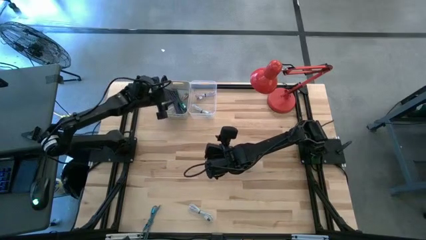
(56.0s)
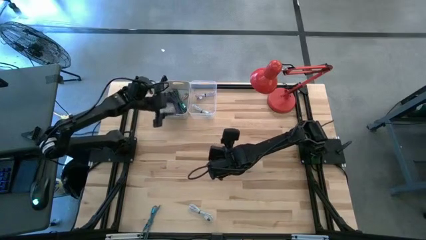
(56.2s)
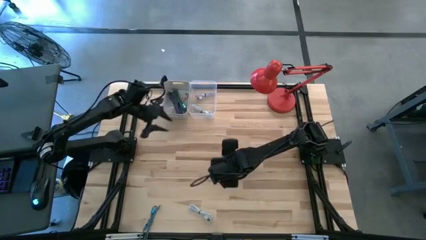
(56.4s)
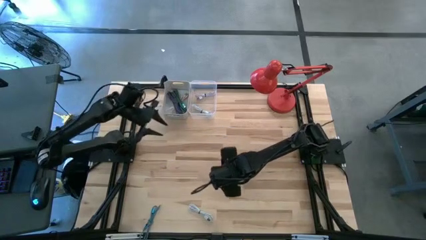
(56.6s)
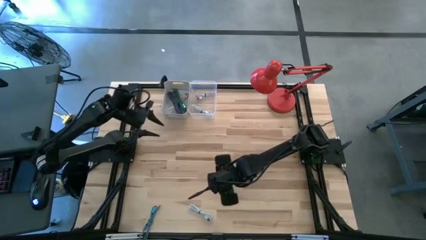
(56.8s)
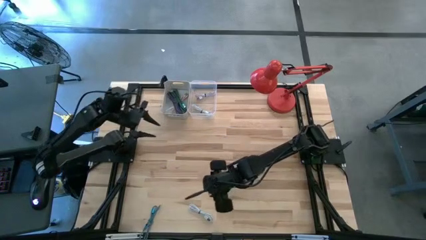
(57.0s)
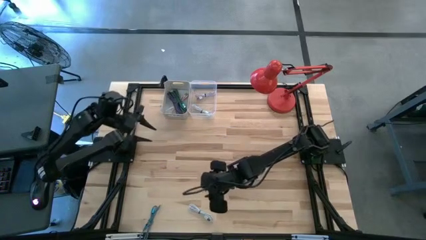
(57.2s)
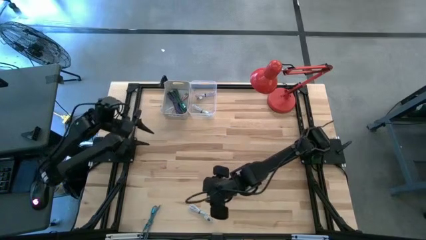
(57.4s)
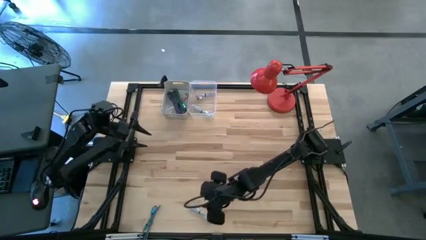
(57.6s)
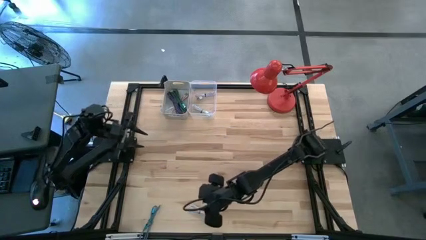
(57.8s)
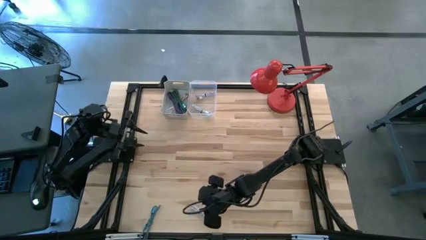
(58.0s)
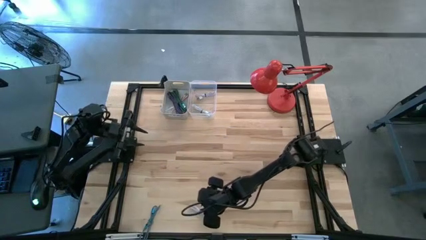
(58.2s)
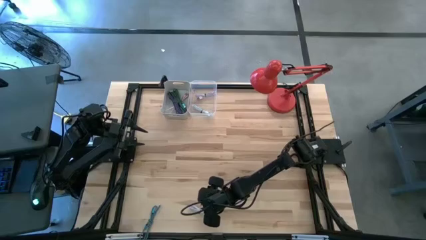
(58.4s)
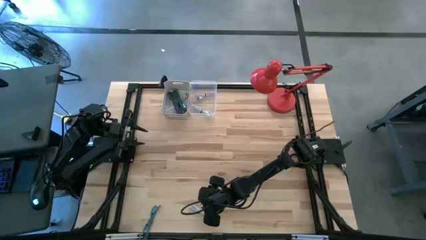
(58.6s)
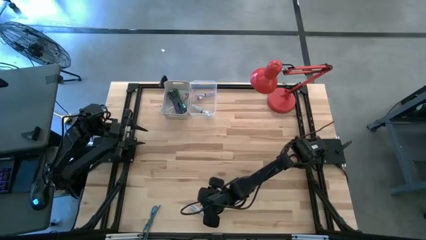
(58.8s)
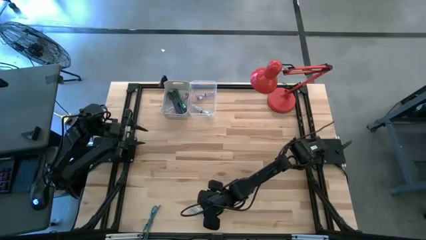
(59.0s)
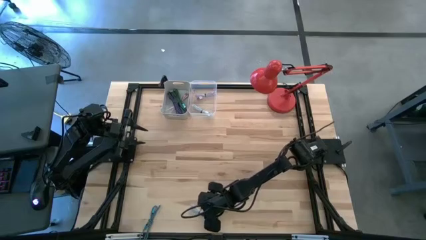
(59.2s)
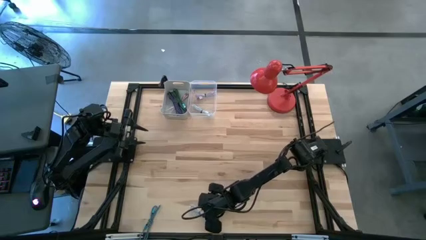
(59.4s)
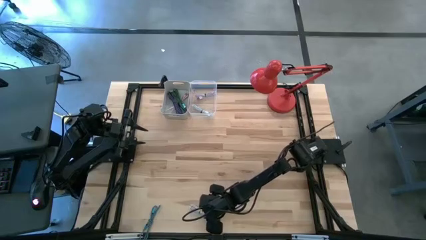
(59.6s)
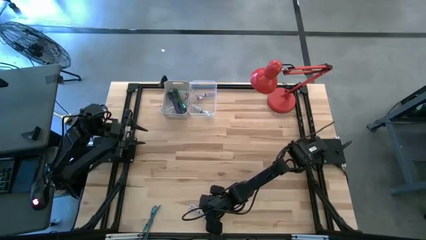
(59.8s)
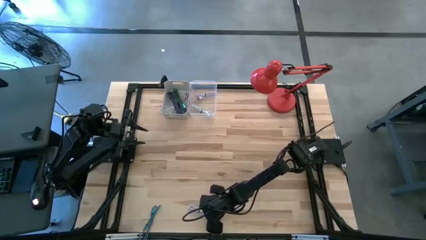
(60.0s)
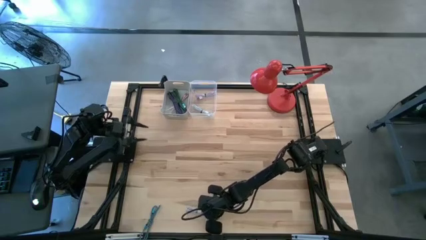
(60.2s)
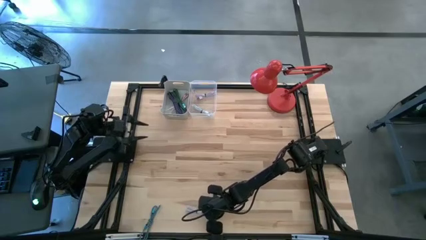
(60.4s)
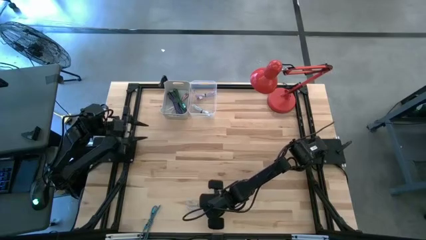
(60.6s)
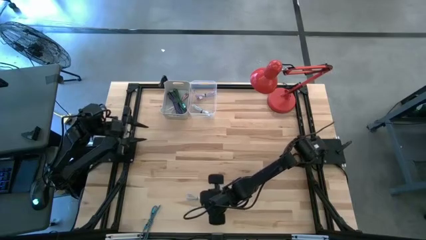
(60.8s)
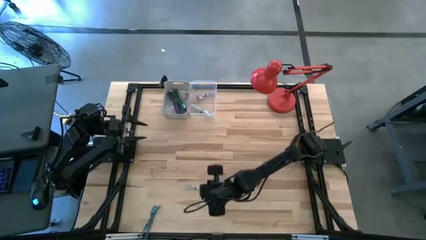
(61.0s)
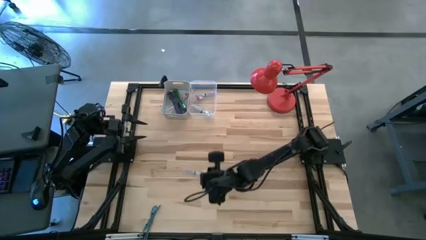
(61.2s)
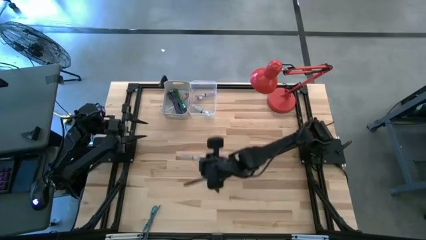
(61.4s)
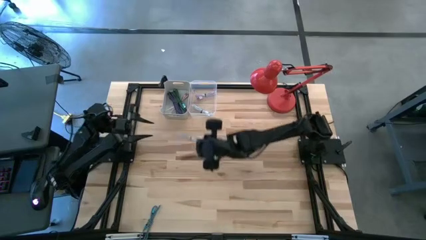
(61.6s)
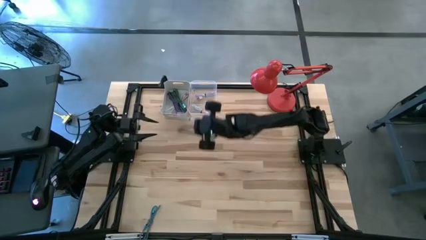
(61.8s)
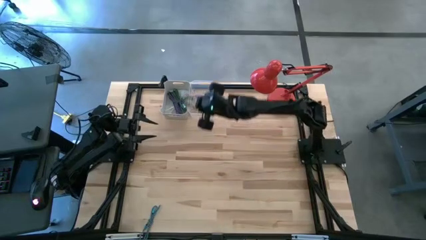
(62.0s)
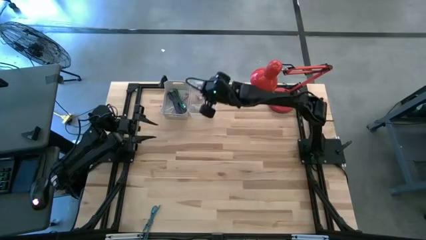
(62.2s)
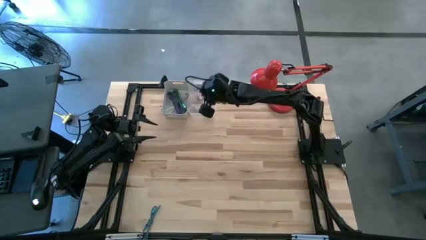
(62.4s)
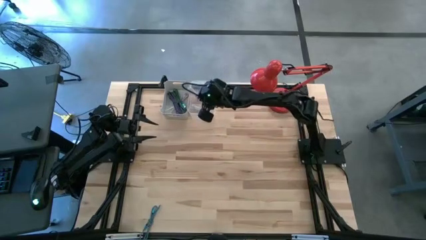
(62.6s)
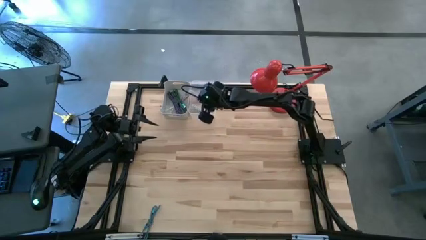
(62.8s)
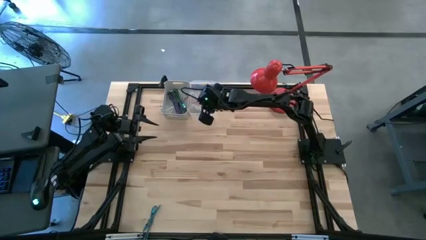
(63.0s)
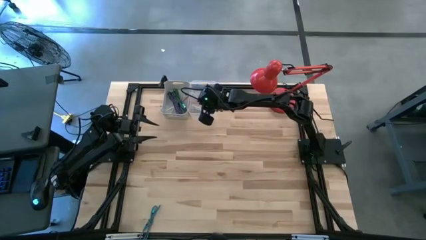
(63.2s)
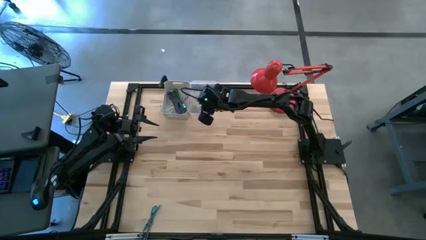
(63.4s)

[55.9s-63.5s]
Task: Pick & Place USB Port
Put the white charger cable into the transparent bin

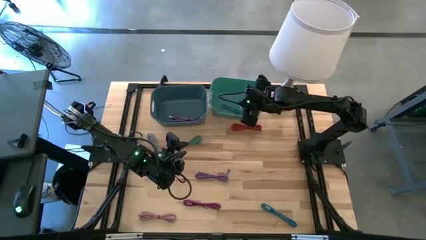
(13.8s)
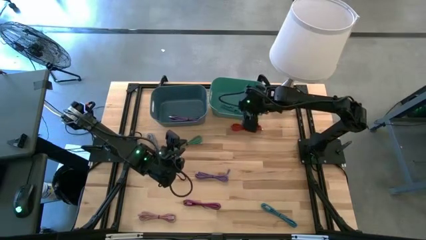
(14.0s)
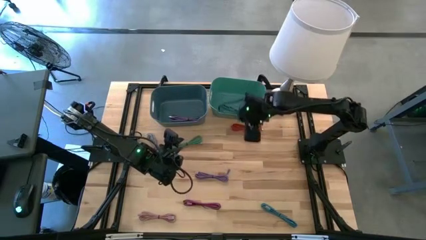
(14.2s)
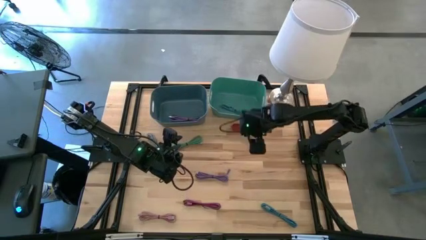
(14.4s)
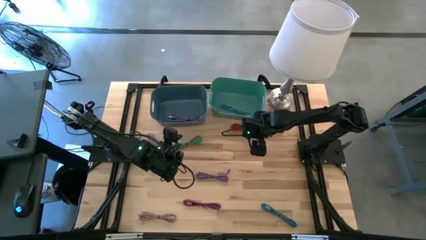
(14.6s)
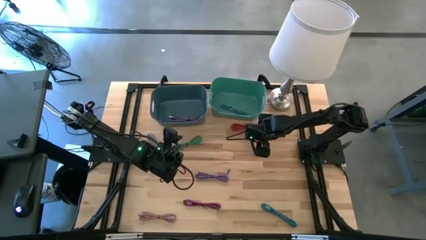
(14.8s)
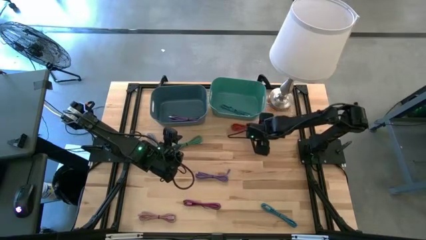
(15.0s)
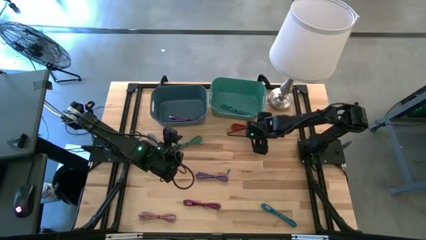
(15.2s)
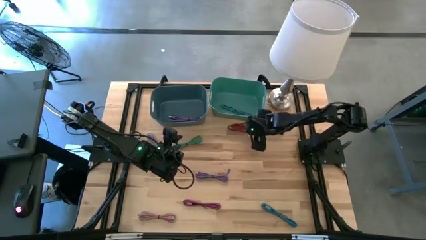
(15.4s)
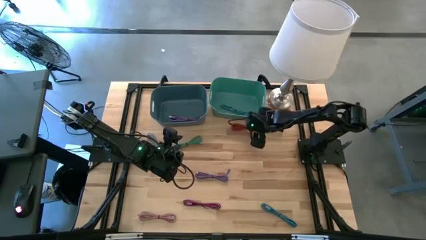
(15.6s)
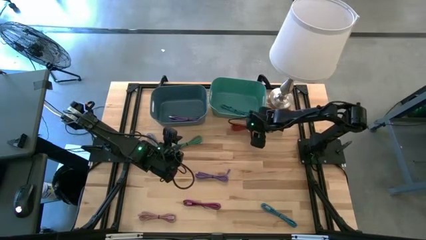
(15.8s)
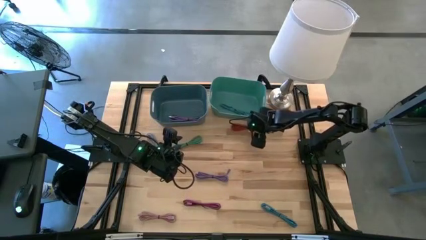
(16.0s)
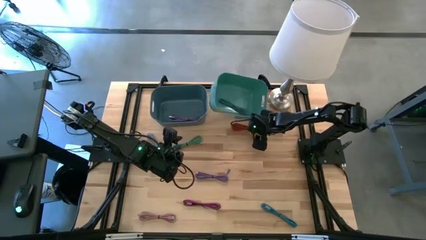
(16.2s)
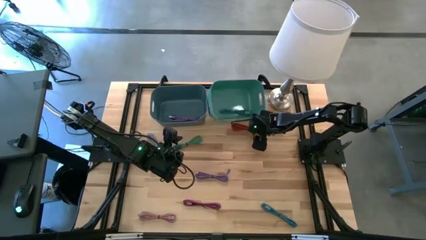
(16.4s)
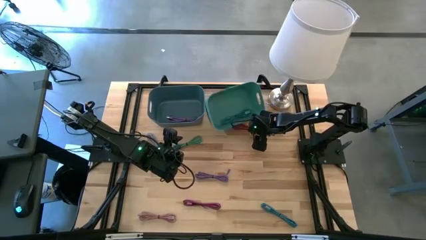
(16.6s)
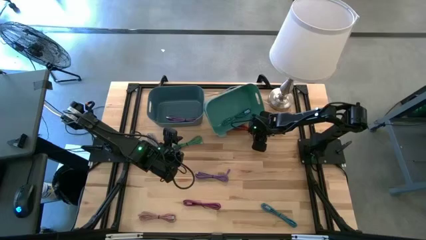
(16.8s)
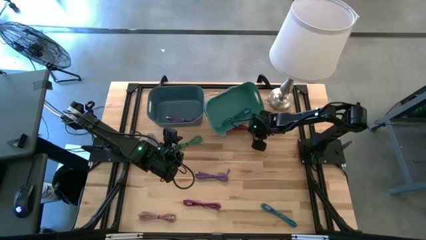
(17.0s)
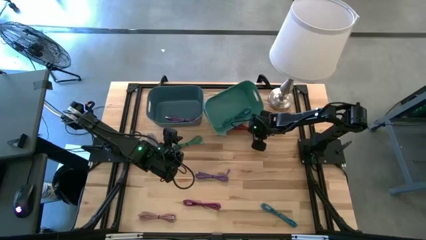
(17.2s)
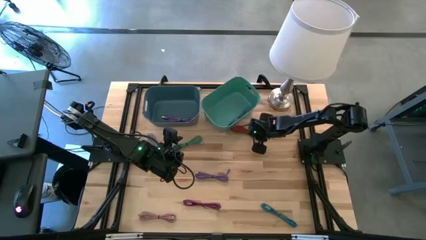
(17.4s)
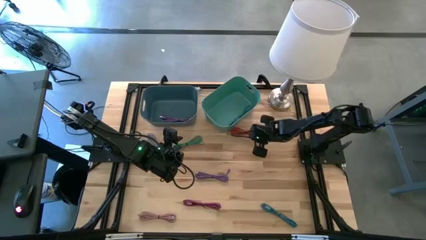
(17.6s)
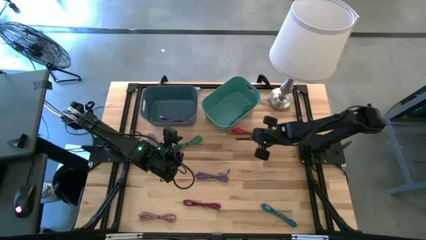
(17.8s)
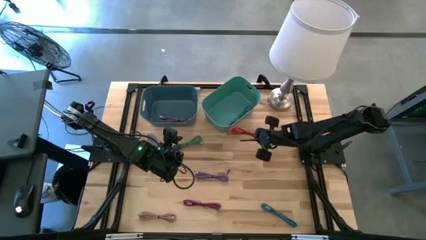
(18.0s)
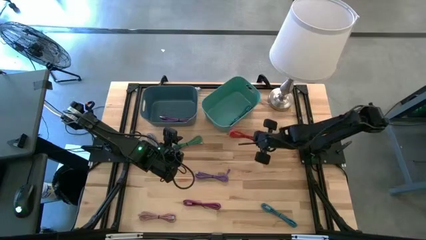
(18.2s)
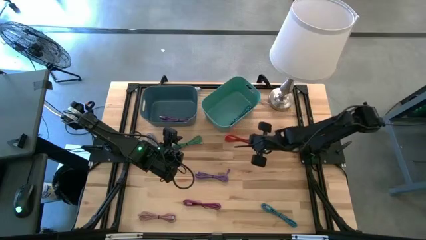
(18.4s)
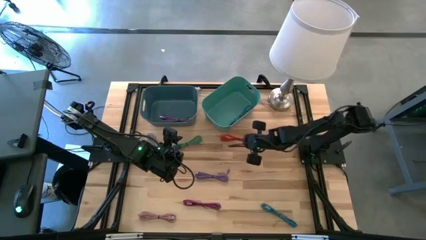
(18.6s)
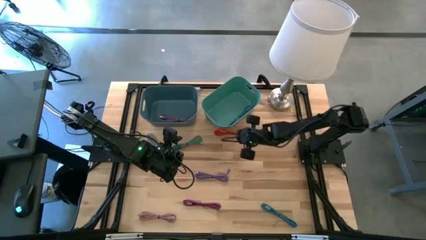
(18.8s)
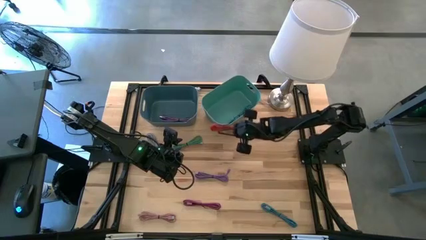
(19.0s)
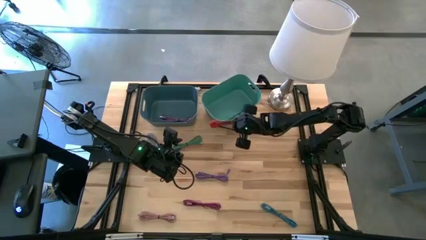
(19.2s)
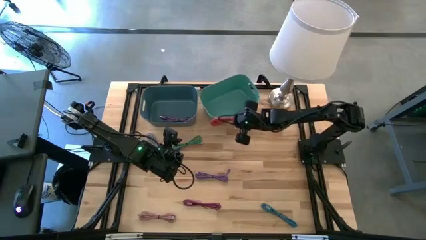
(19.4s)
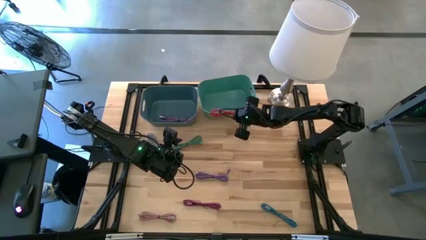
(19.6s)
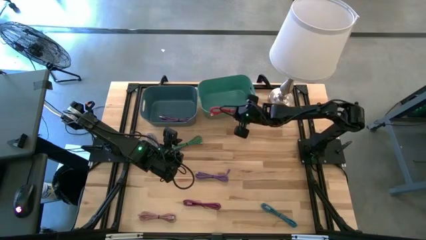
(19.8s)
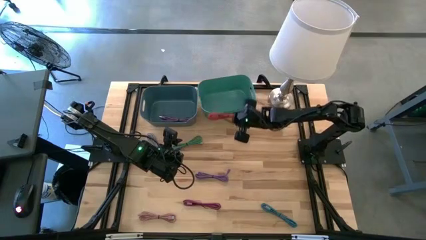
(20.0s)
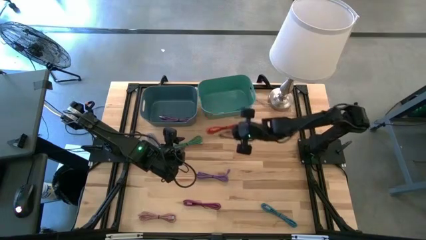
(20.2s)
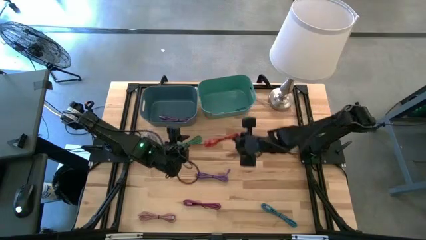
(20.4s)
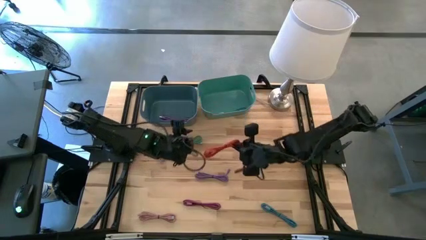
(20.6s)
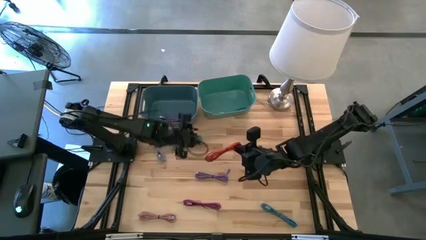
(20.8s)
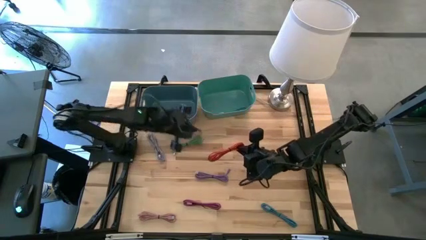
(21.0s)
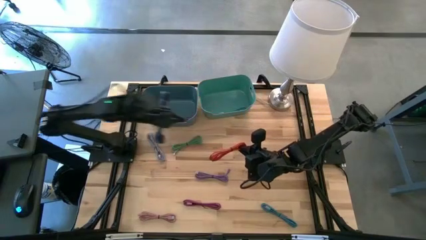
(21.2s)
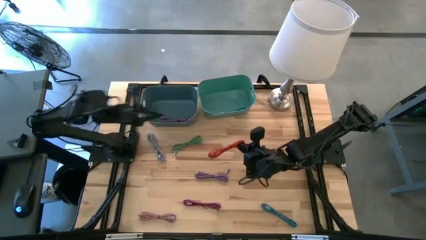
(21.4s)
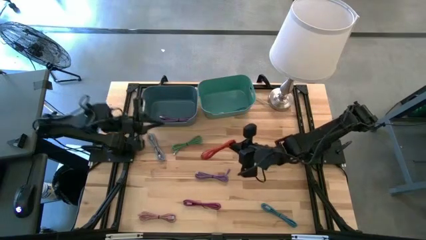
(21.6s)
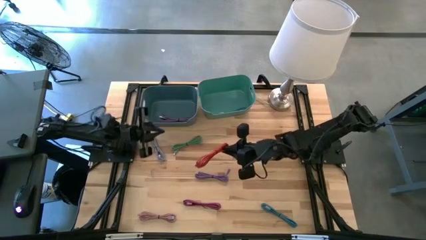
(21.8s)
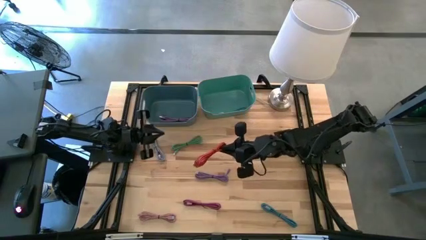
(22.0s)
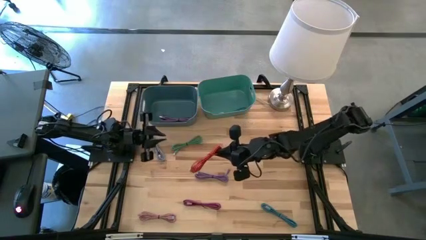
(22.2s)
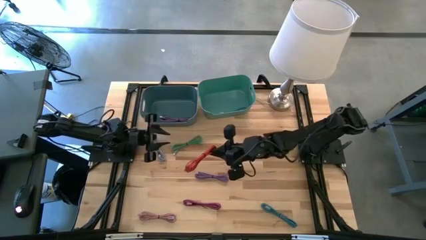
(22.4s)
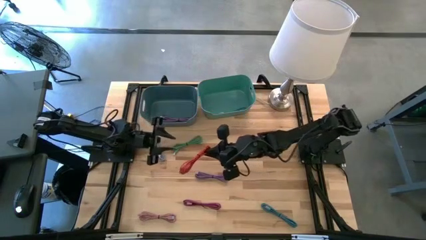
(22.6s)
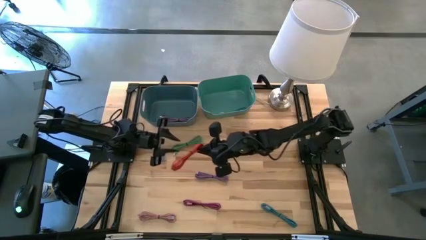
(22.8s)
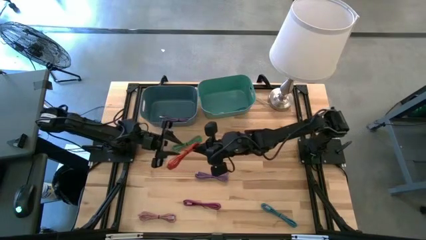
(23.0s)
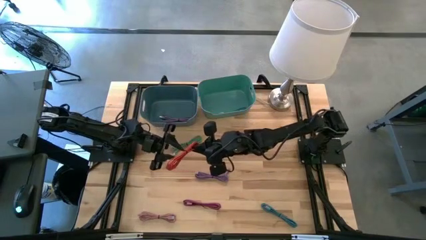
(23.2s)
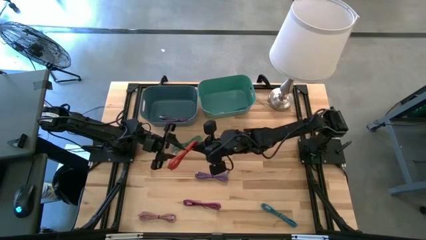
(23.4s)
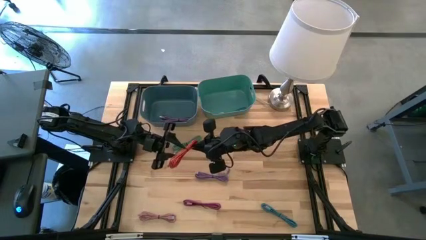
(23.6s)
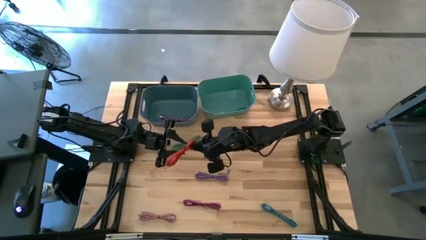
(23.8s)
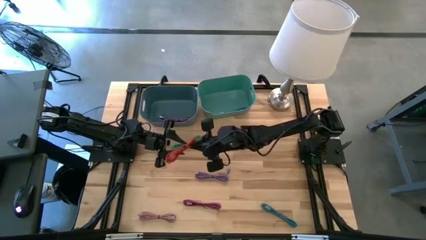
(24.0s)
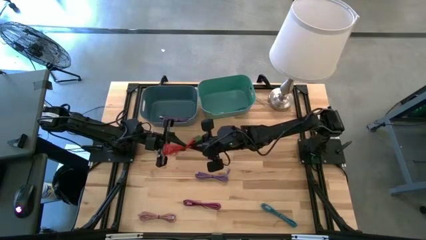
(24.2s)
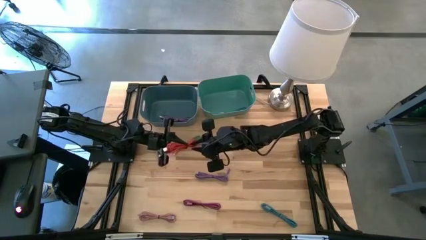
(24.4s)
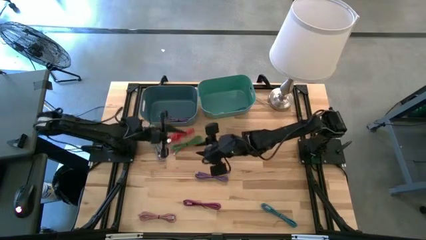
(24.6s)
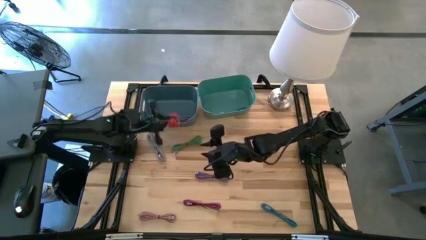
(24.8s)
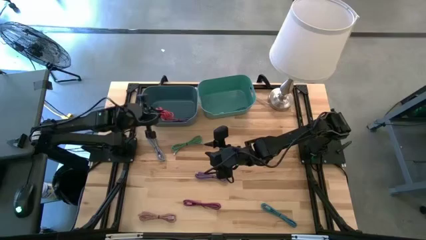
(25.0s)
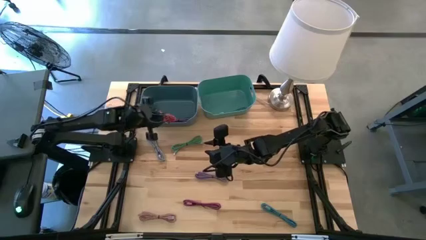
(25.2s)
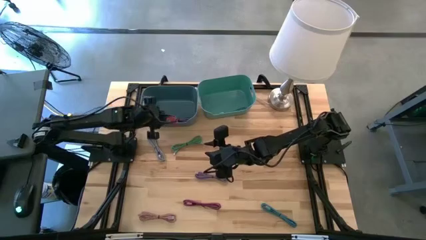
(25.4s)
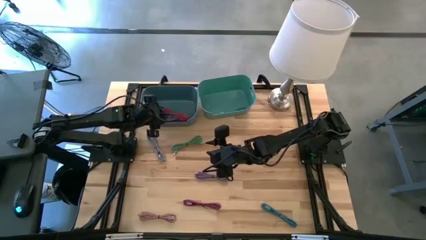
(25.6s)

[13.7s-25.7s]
Task: Pick & Place USB Port
Put the orange charger cable into the blue bin
